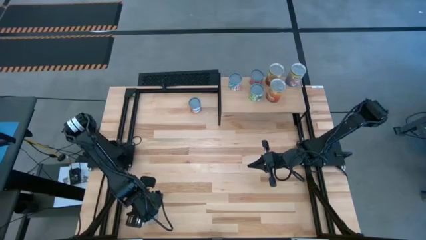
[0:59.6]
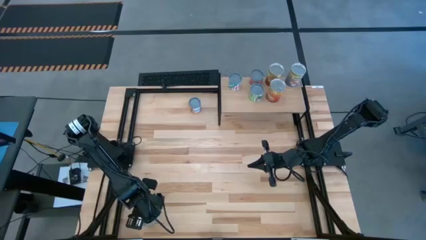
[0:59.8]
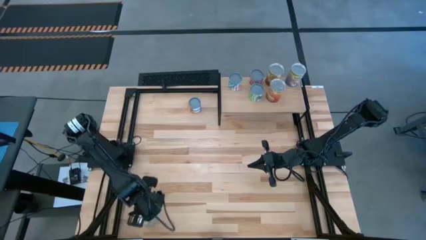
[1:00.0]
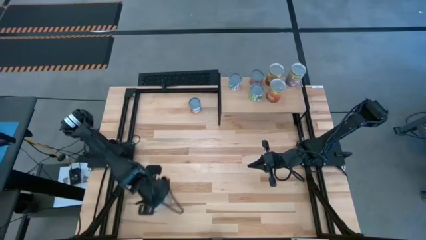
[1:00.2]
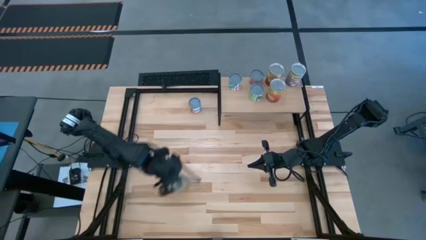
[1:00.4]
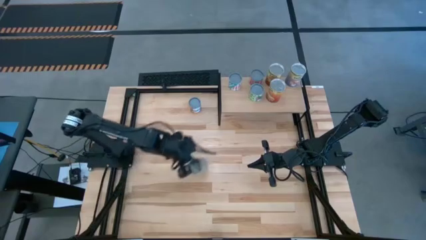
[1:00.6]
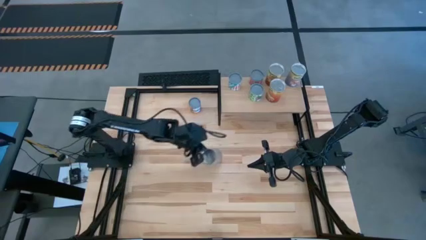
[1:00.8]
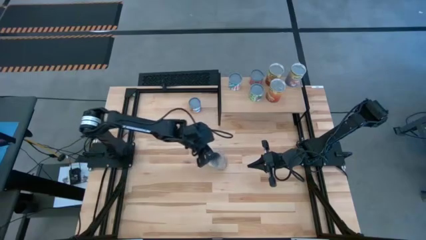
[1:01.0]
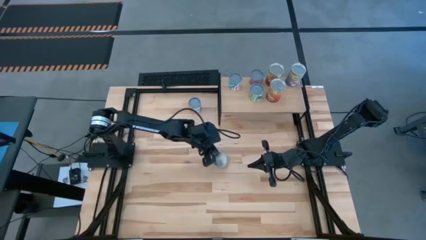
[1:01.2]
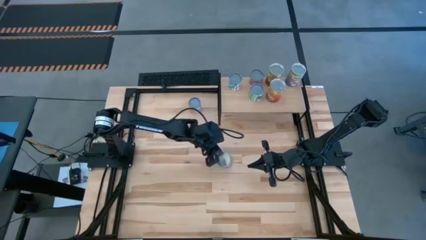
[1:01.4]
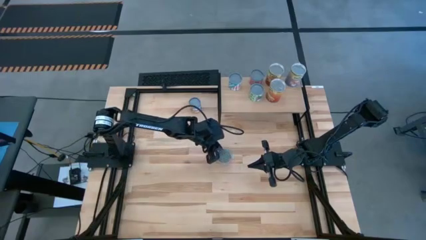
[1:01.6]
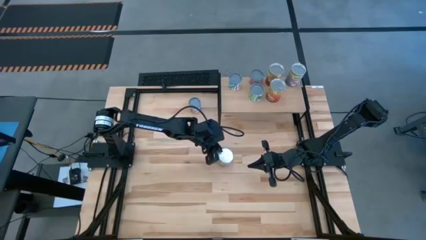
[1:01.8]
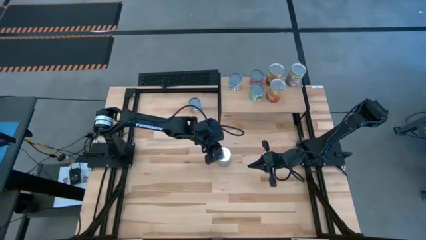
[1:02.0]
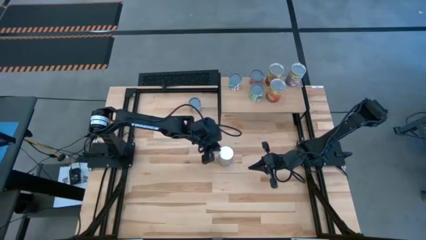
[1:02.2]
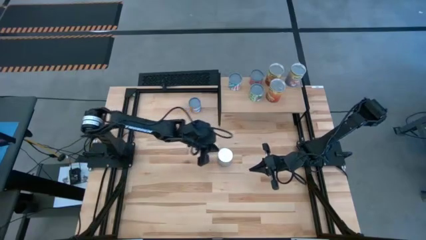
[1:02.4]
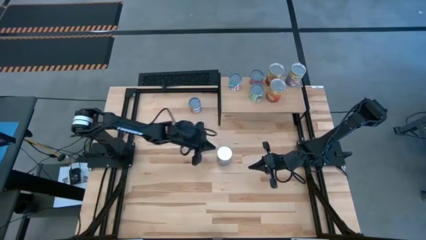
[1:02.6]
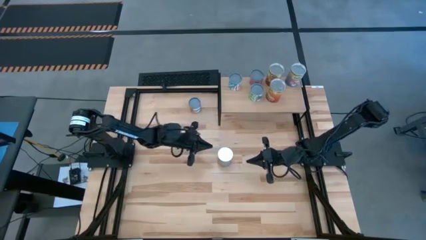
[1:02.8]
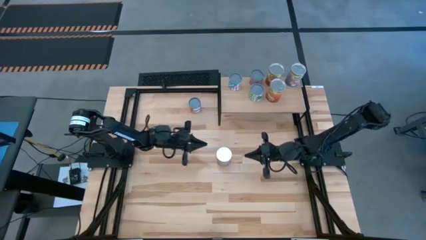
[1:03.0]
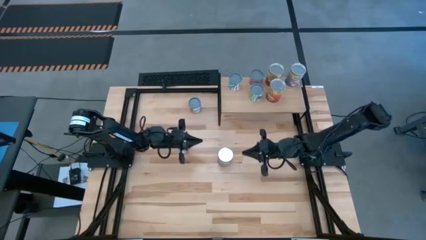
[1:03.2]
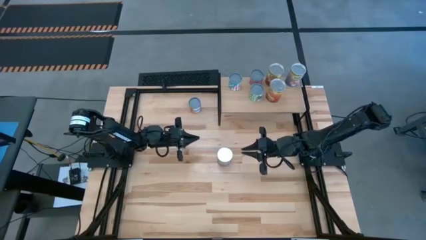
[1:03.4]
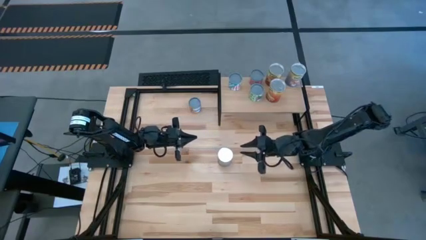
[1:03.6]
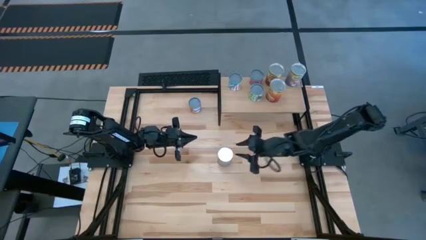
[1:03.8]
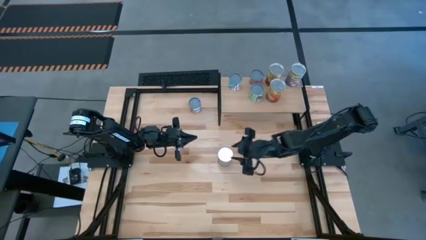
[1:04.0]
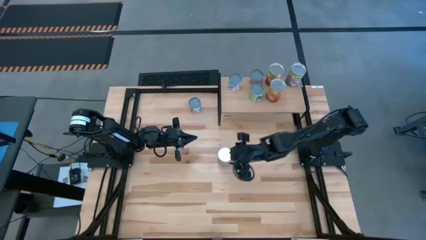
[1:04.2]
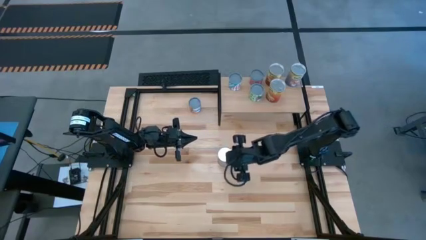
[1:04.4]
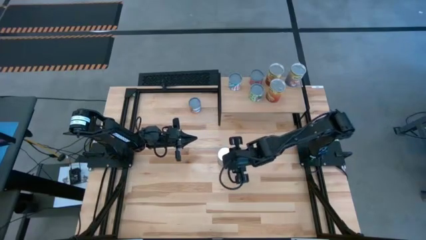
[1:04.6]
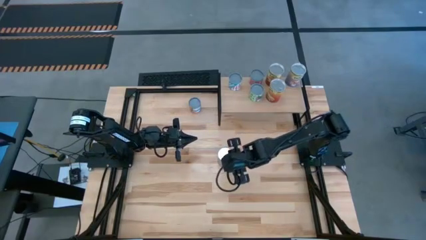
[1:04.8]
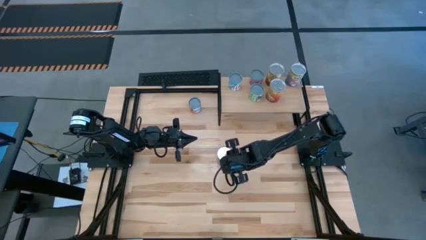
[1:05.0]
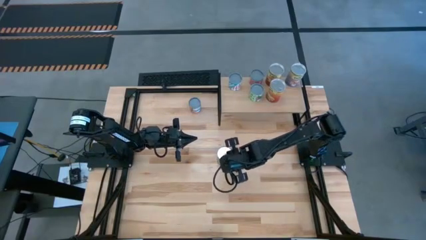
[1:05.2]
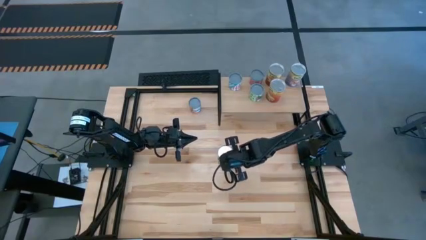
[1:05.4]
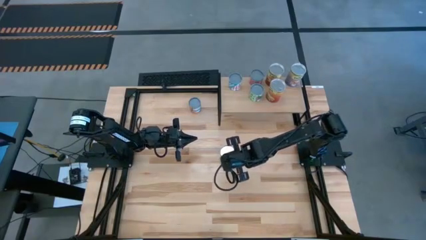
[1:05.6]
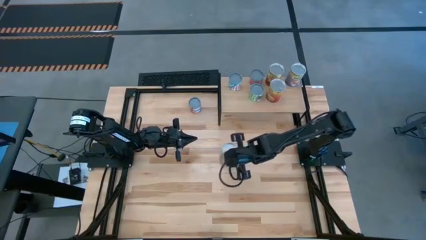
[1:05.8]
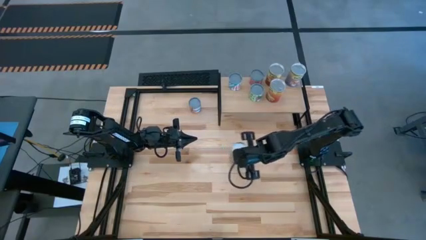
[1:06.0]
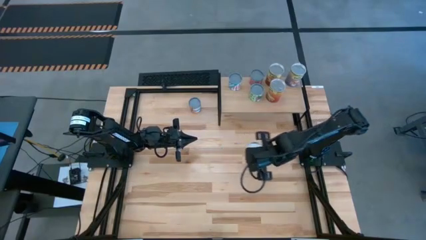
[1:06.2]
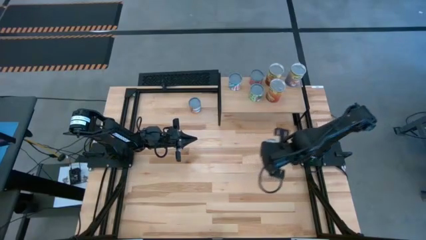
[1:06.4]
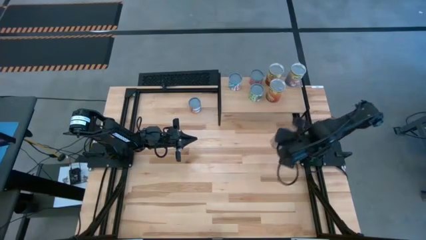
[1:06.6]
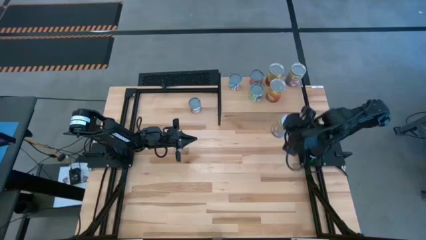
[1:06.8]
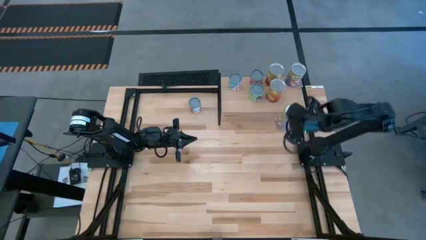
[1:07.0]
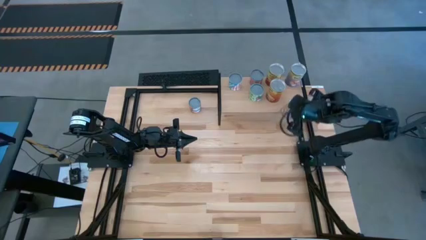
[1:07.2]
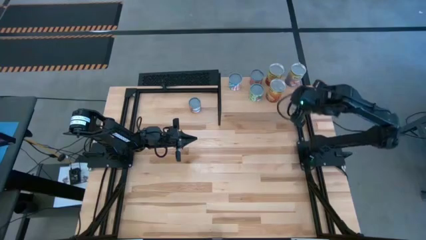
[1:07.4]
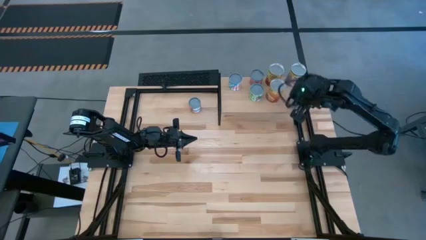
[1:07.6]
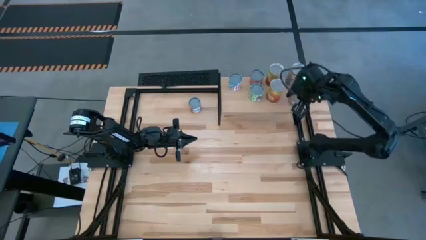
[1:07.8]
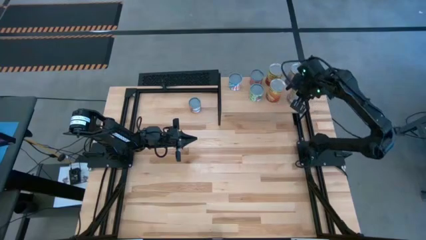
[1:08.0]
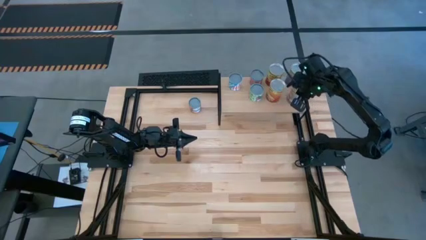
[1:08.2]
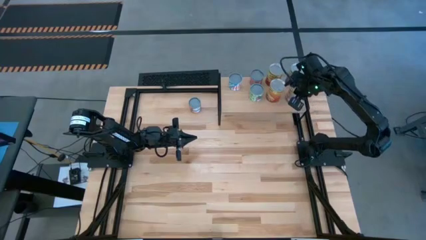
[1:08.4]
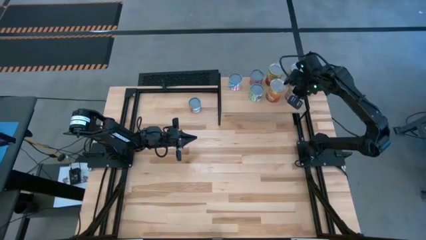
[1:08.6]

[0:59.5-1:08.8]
Task: Pick and place cans onto a shelf
Put the canned peaches on the shelf

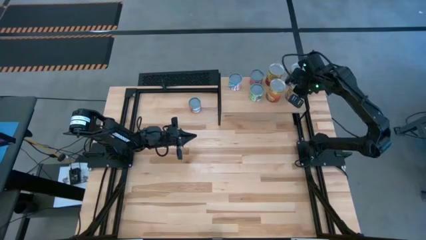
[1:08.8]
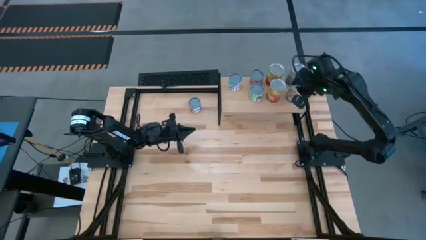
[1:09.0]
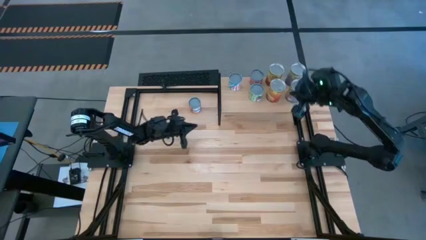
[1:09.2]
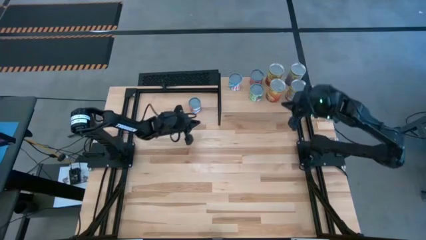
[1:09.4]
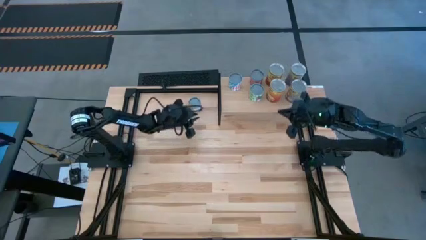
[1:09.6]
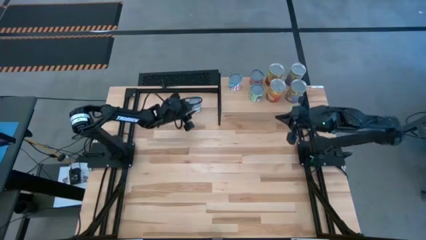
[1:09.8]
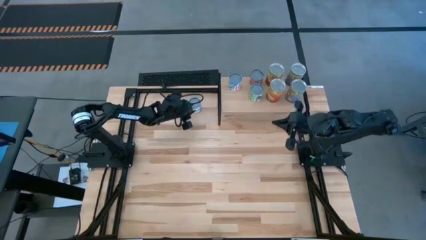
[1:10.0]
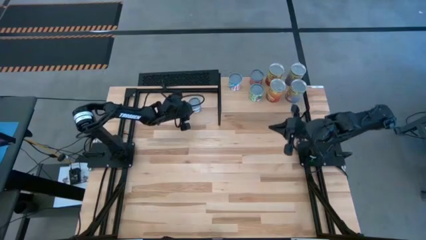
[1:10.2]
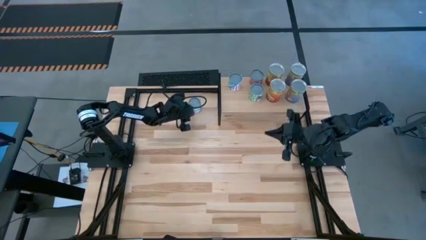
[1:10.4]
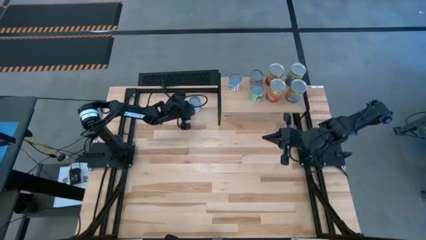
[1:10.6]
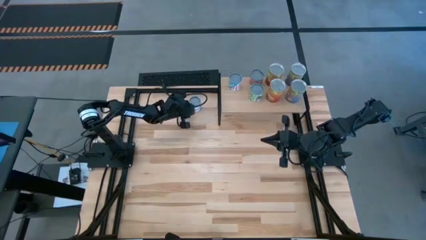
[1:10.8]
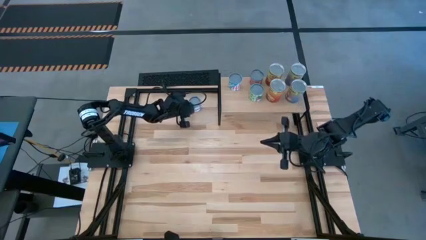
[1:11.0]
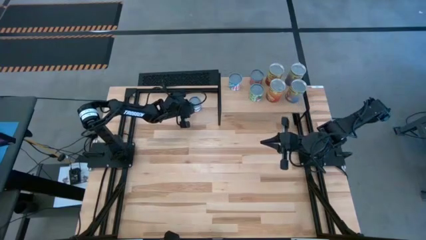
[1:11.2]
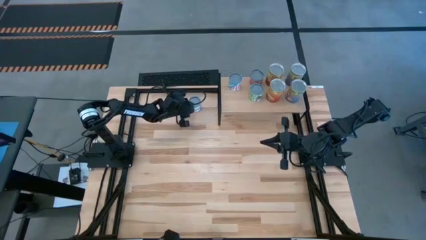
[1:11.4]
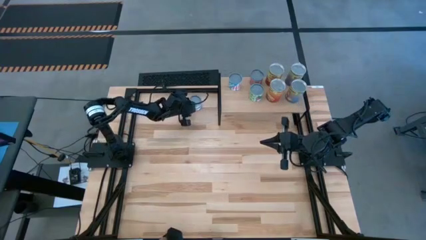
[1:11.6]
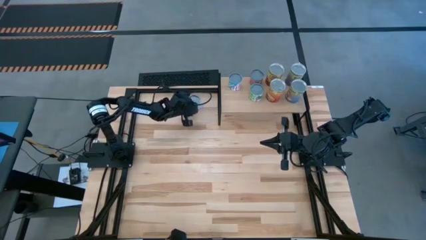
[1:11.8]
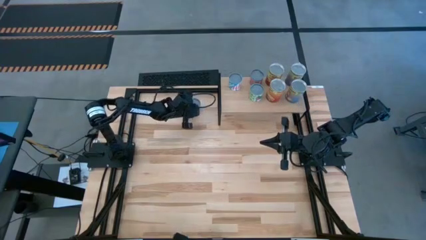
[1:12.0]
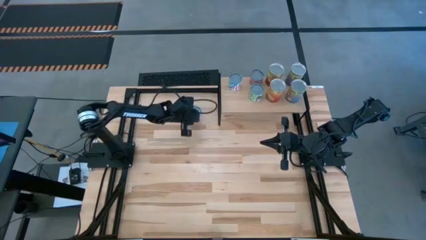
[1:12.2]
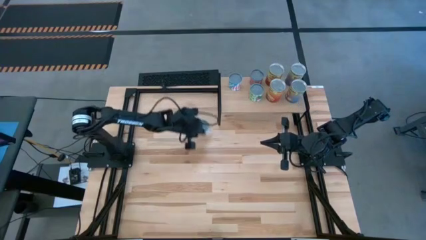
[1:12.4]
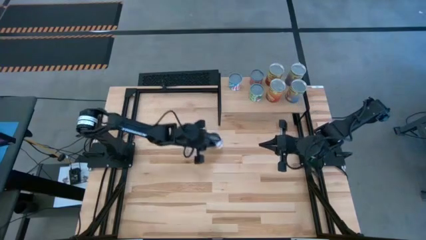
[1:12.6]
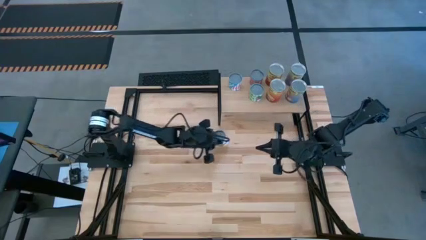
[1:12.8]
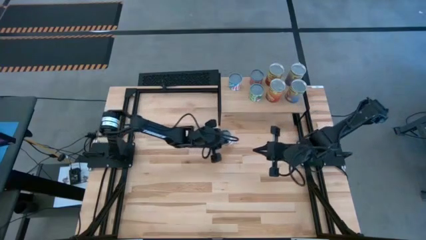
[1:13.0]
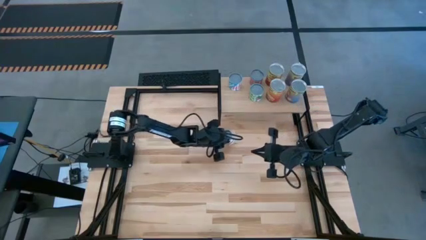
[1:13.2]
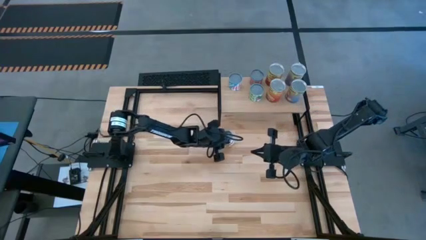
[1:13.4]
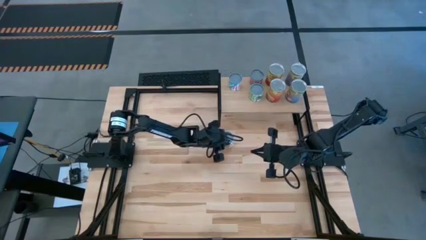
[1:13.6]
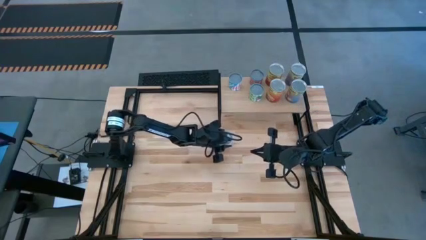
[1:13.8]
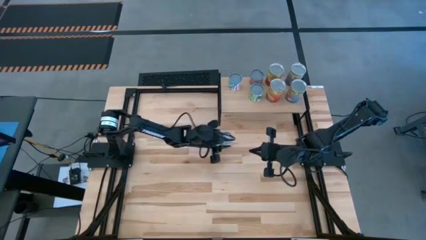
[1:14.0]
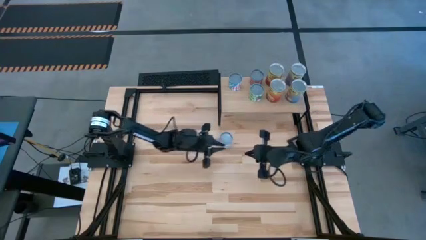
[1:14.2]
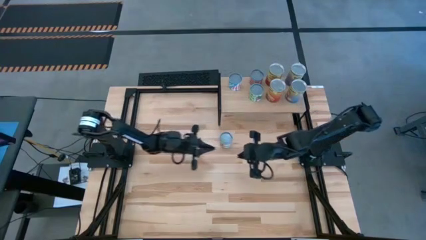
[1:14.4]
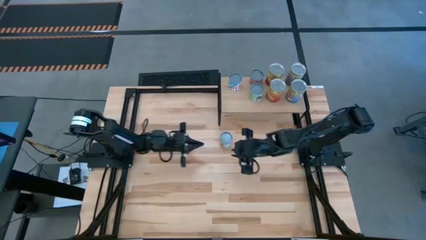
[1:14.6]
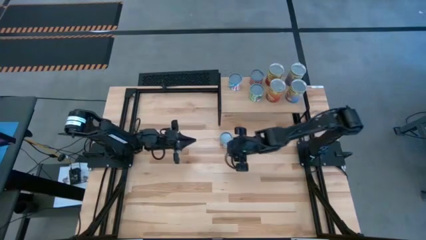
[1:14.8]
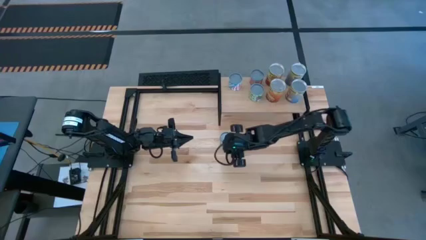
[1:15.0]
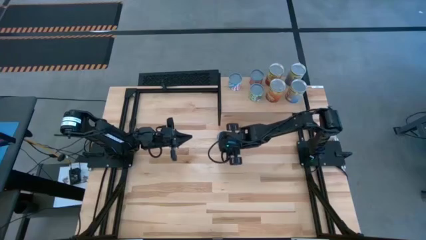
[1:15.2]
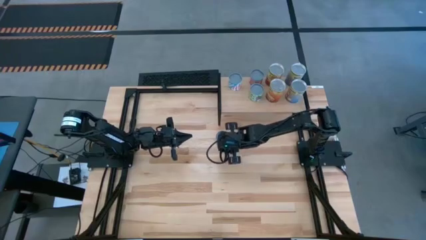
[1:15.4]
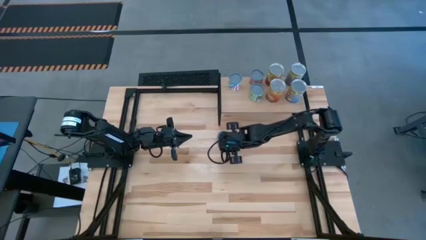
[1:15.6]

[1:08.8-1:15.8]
Put the canned oranges on the shelf

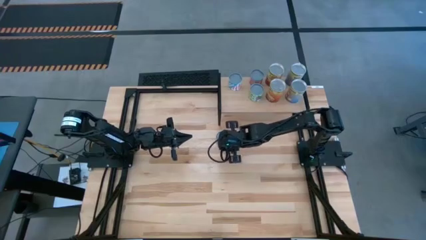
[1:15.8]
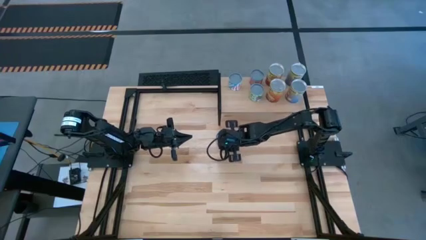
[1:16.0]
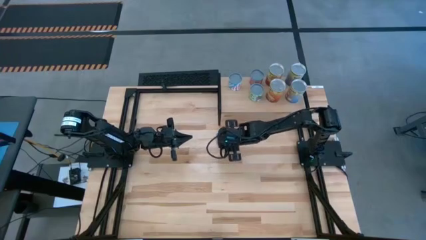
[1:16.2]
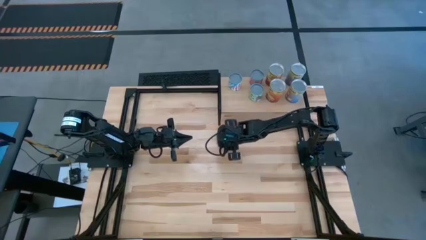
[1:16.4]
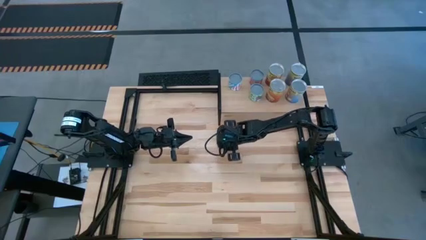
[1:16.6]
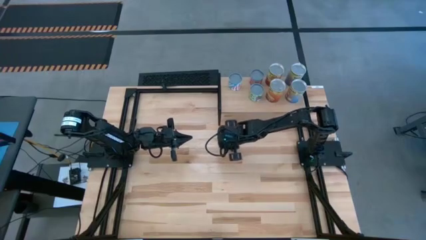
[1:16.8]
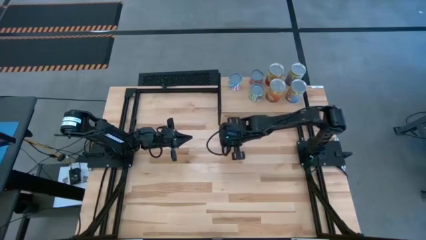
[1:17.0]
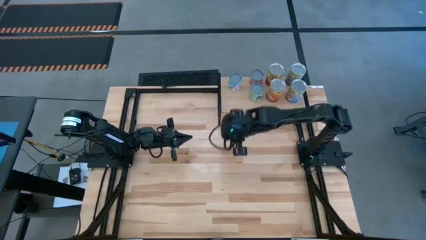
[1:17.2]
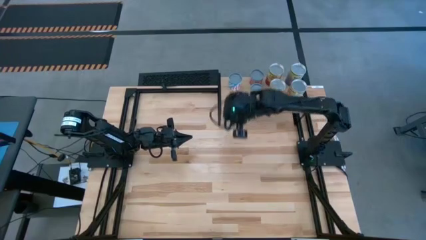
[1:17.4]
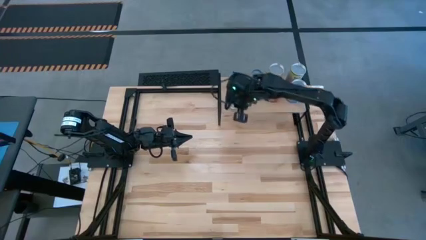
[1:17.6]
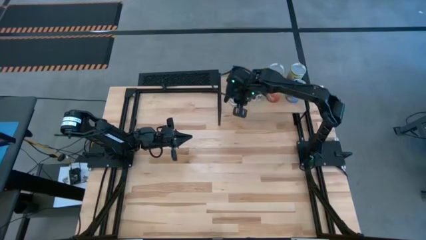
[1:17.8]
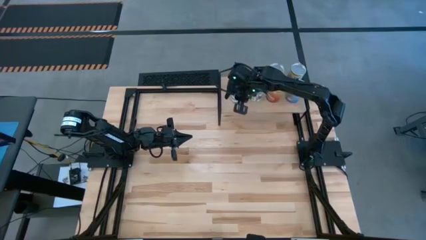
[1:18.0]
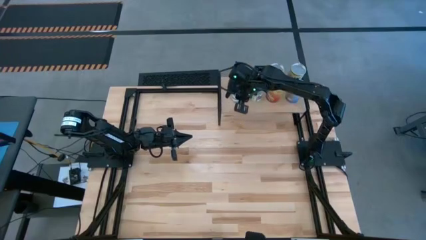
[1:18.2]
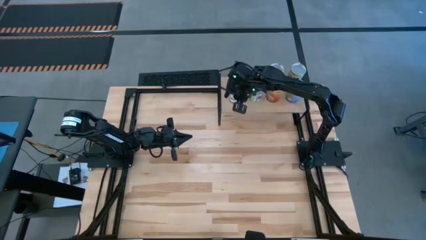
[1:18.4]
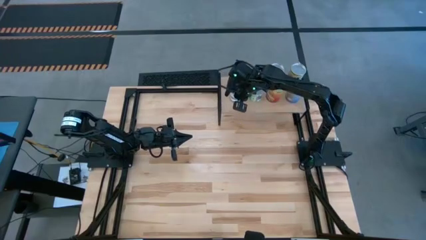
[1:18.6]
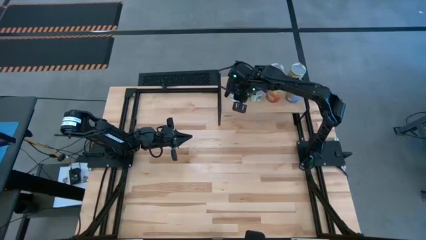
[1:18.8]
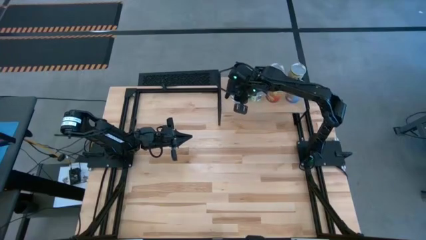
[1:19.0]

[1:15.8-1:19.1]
Put the canned oranges on the shelf
